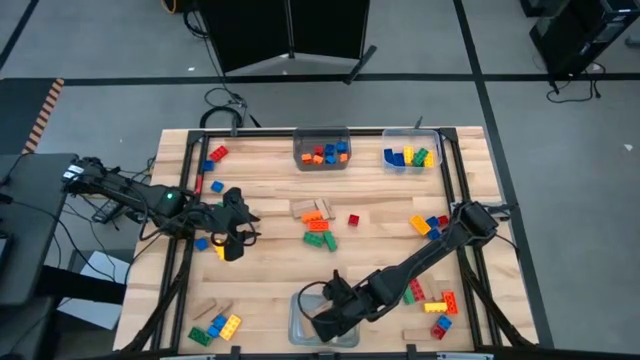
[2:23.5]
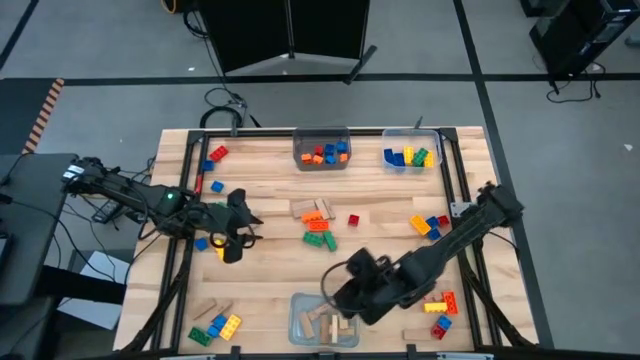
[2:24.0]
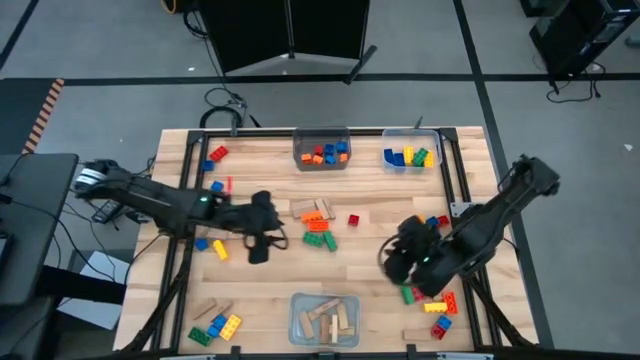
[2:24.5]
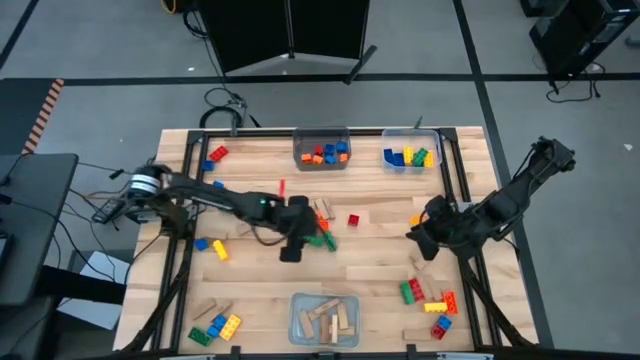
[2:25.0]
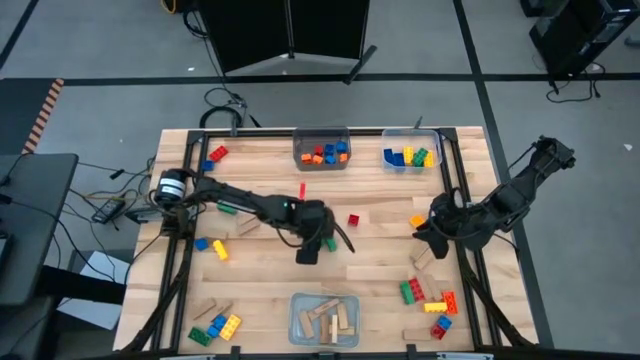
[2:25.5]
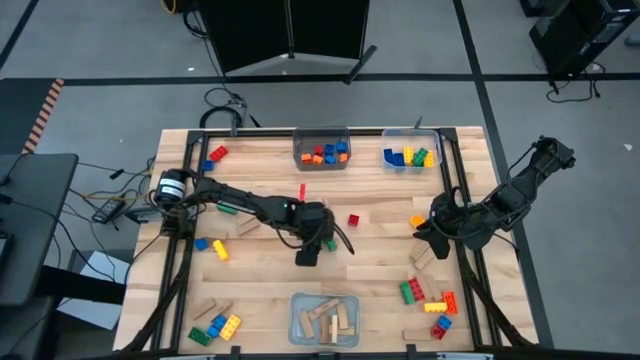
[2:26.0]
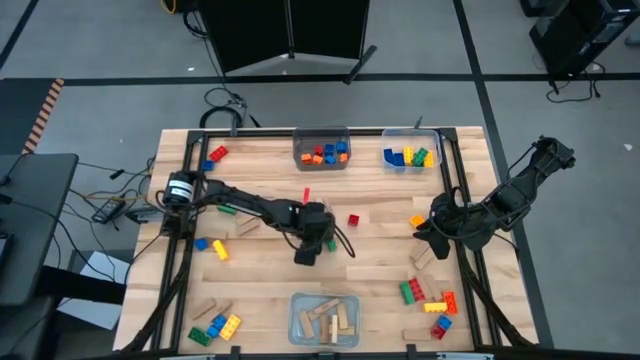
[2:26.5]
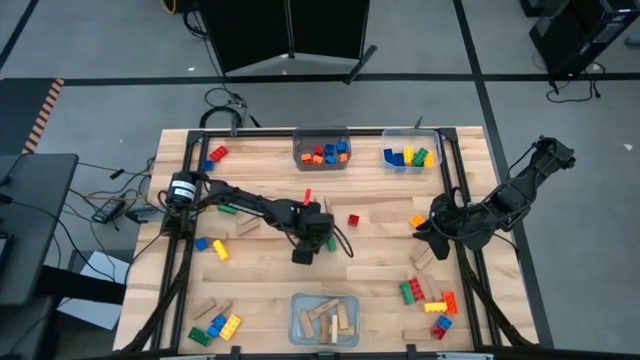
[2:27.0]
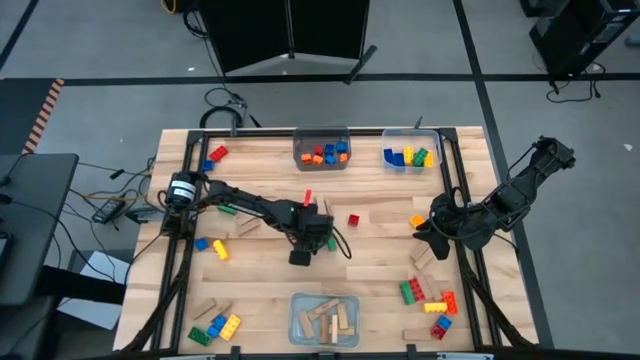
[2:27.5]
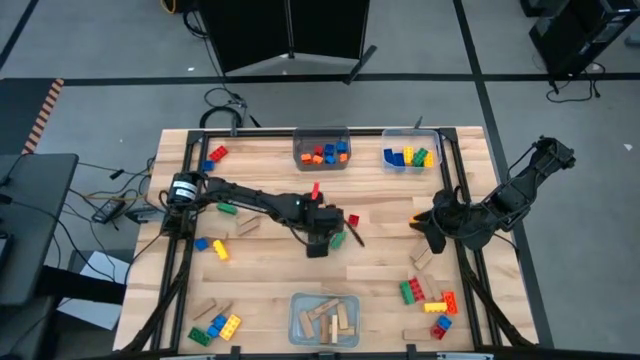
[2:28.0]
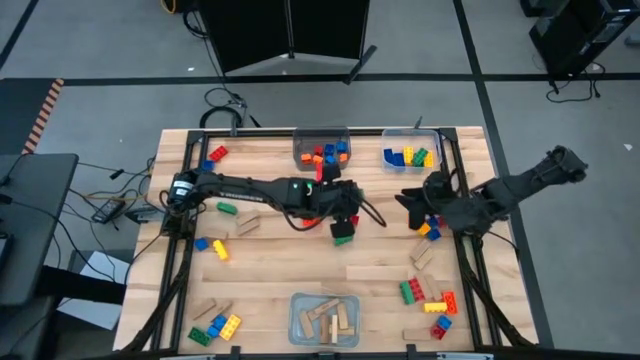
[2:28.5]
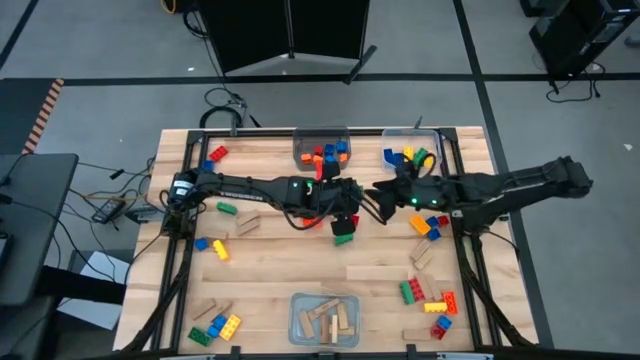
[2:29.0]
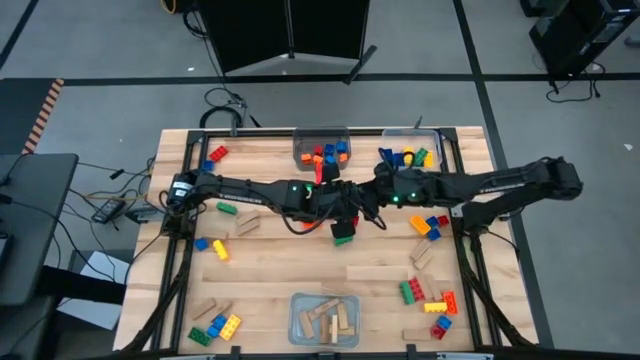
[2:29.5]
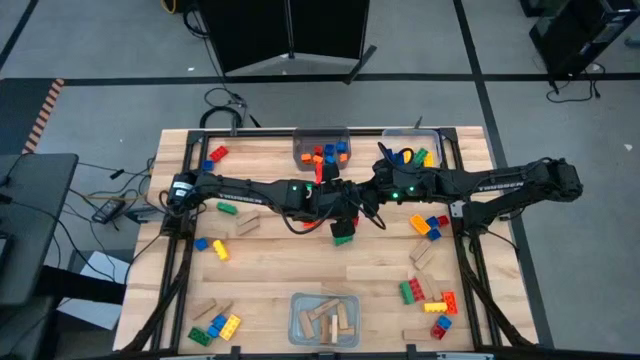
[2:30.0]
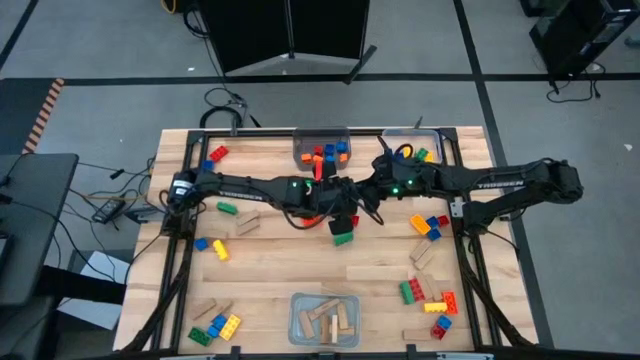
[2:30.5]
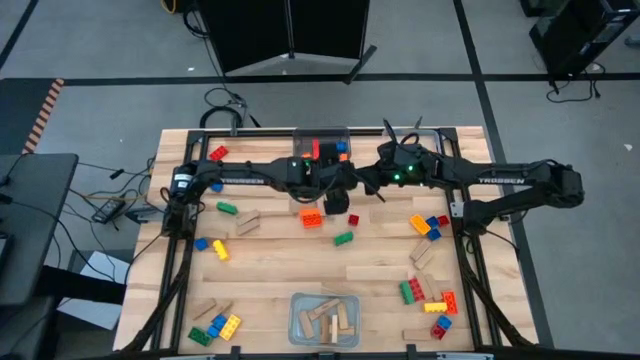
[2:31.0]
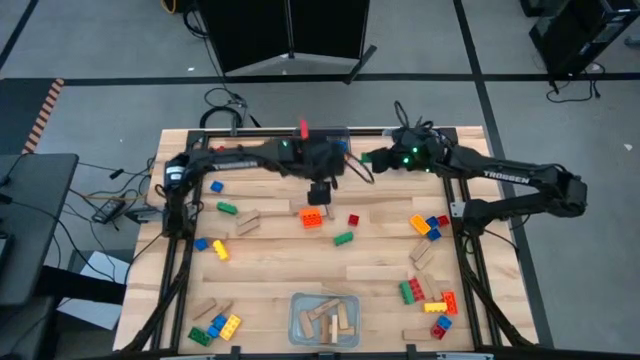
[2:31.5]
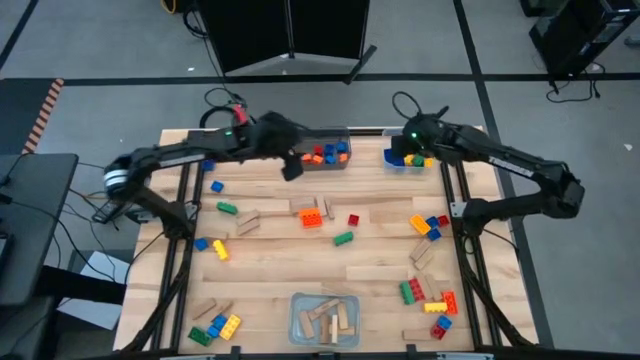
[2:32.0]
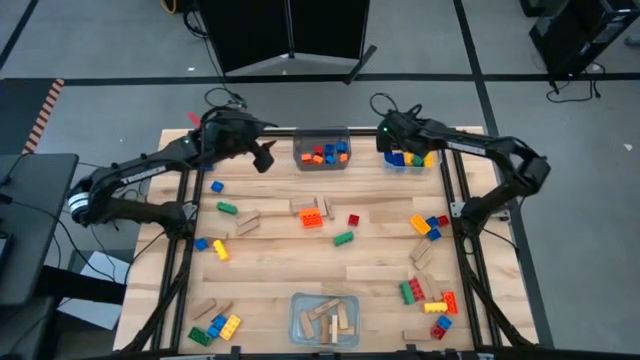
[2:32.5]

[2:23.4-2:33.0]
Task: Sort blocks by size
Put the large green game piece into the transparent bin

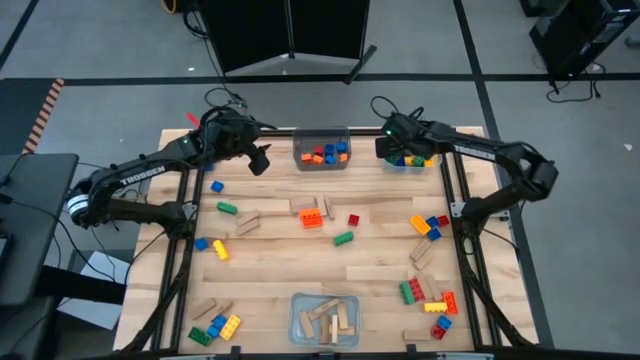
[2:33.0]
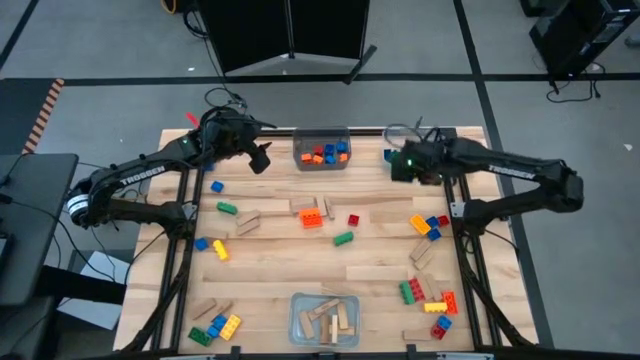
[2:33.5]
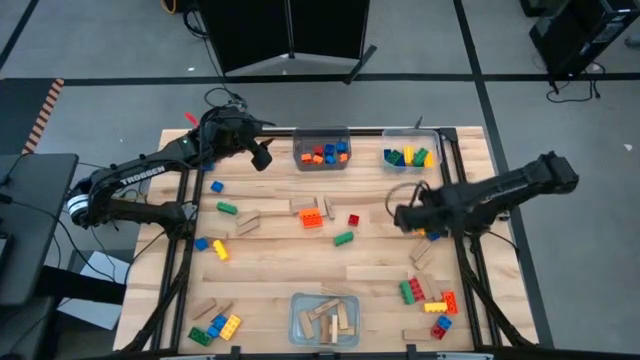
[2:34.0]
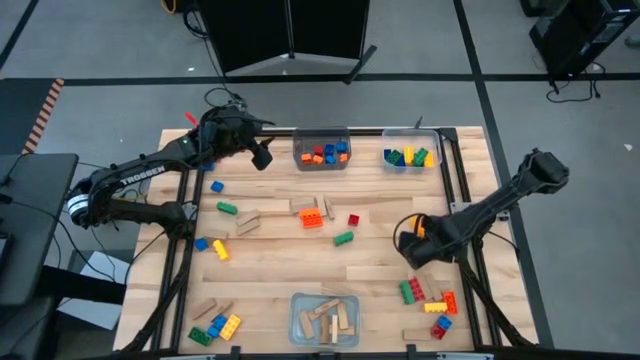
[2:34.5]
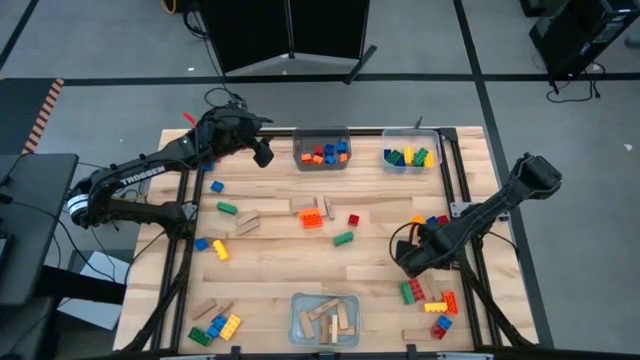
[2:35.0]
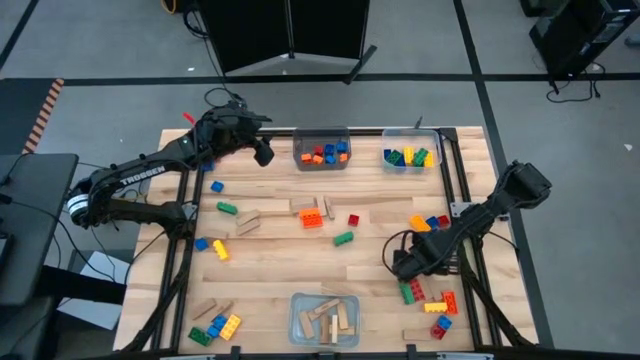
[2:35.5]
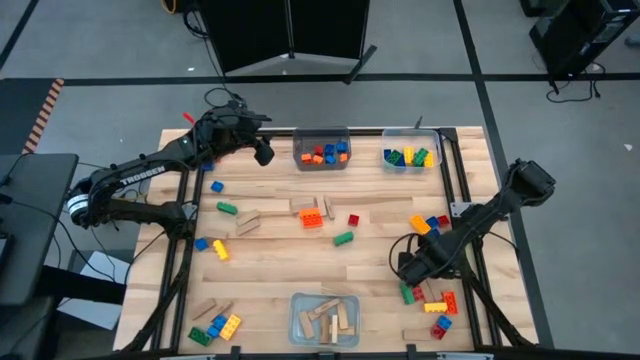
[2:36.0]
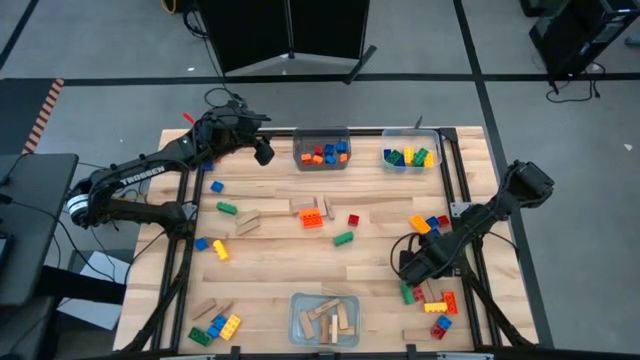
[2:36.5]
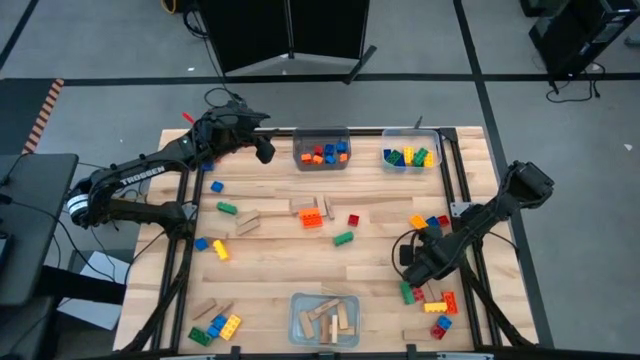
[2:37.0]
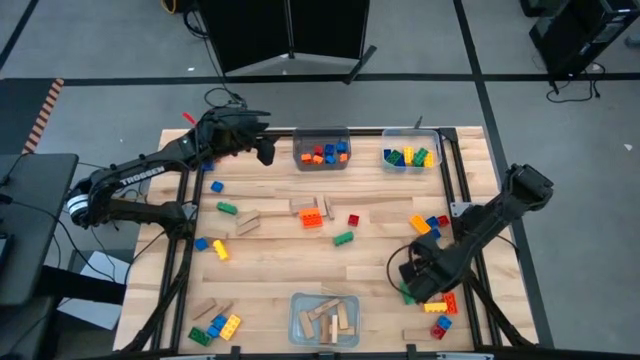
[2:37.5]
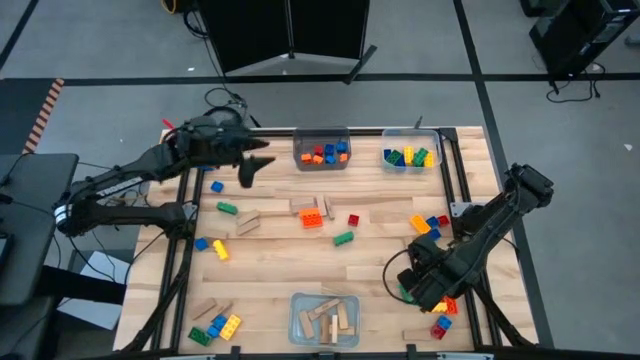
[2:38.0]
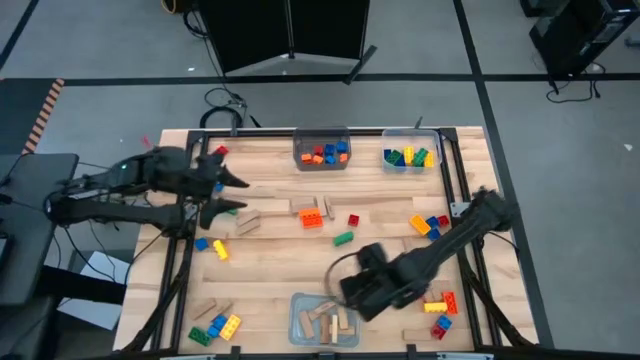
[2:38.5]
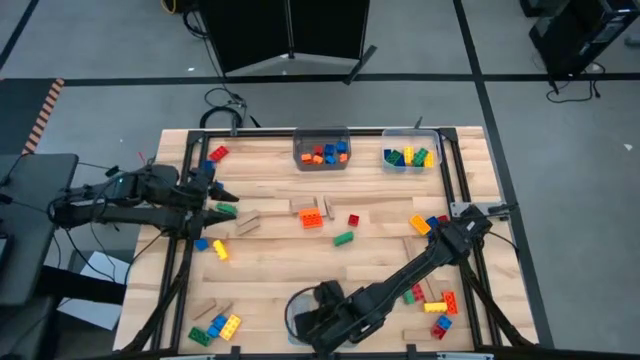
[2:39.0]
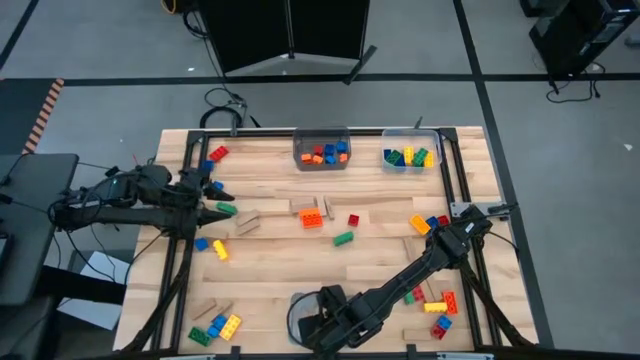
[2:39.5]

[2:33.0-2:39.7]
Put the brown block into the gray bin

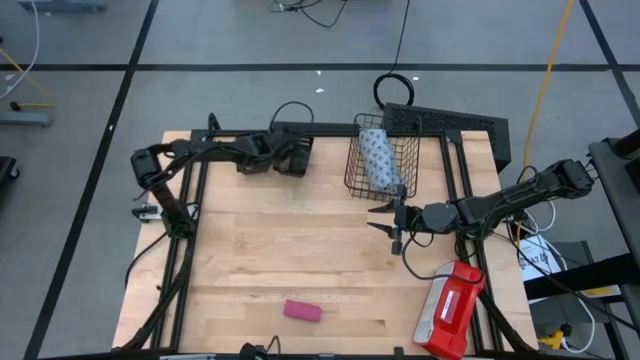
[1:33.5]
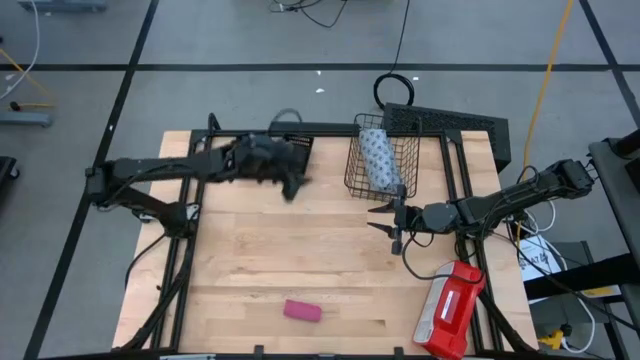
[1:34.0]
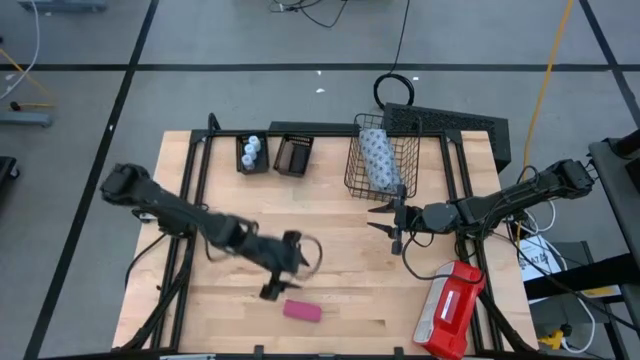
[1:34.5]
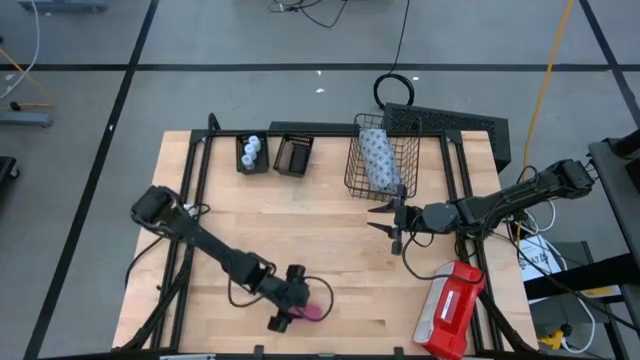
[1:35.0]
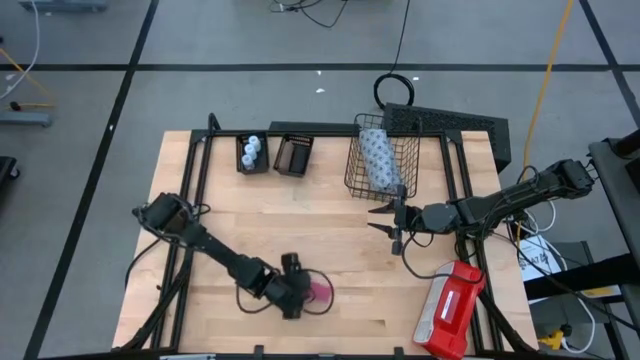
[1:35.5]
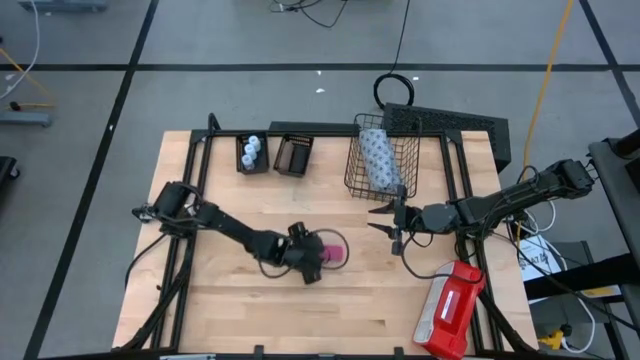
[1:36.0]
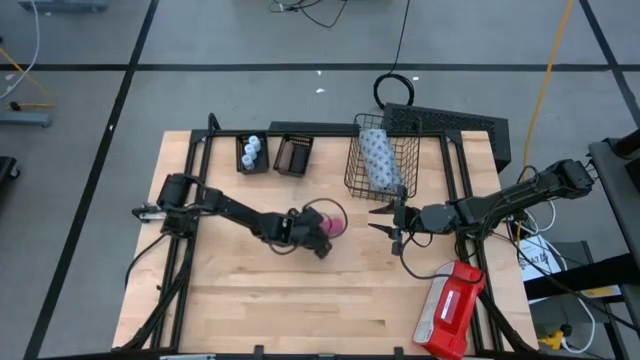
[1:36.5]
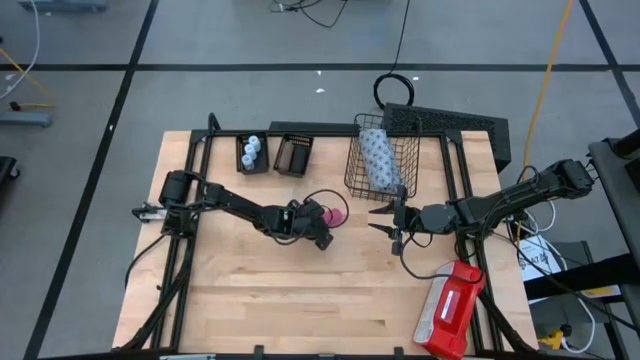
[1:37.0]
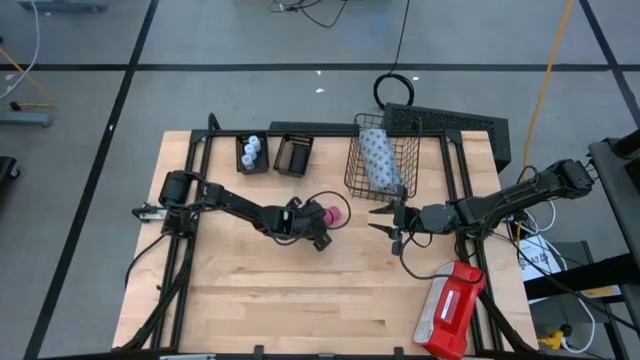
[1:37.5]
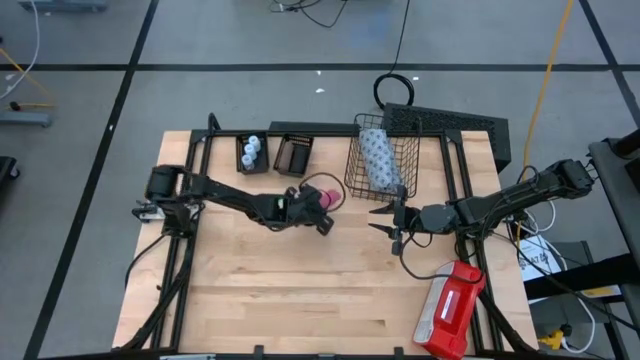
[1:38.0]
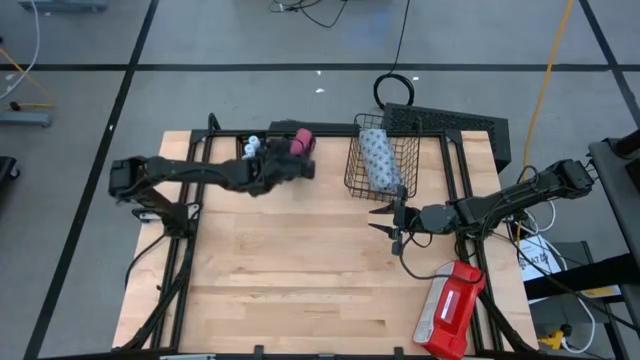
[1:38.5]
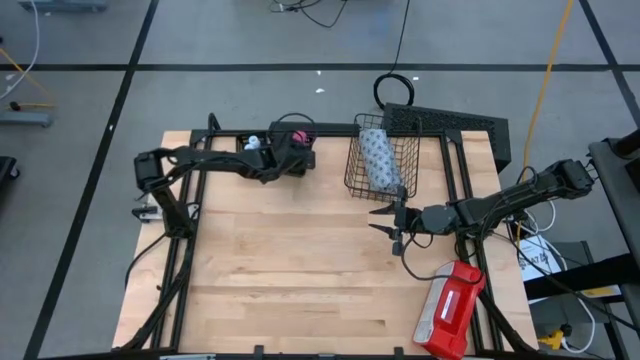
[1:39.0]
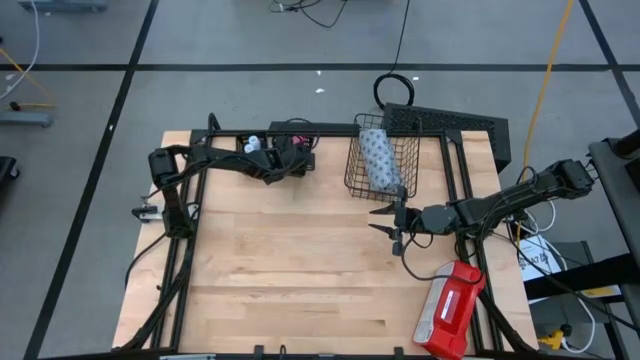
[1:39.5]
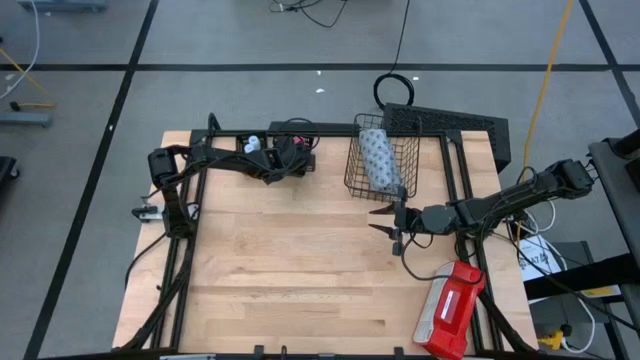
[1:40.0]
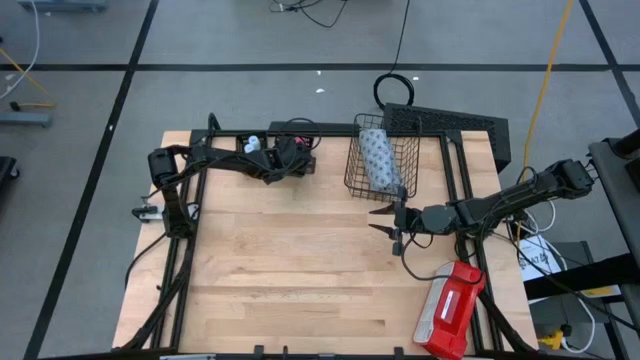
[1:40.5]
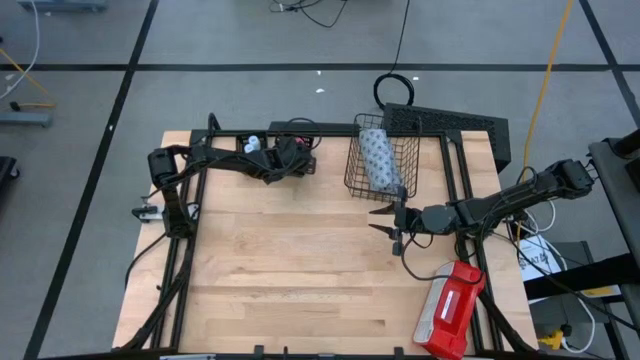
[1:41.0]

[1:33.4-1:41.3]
Task: Pick & place medical supplies in basket/bin
Put the pink rolled bandage into the right black basket
